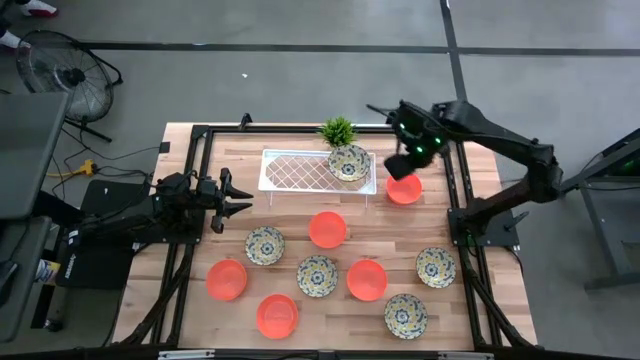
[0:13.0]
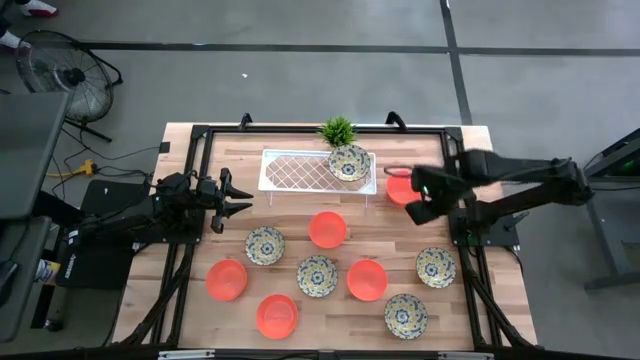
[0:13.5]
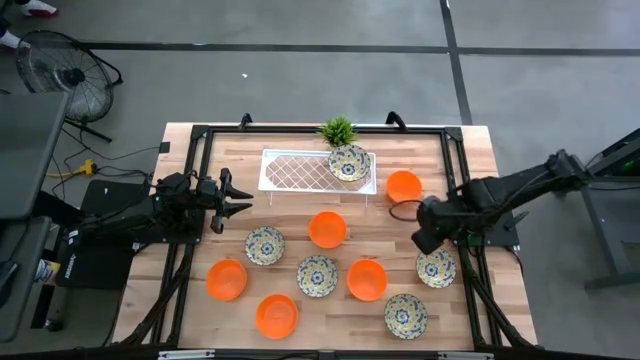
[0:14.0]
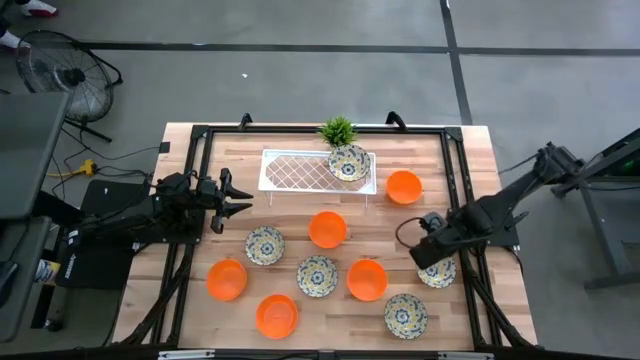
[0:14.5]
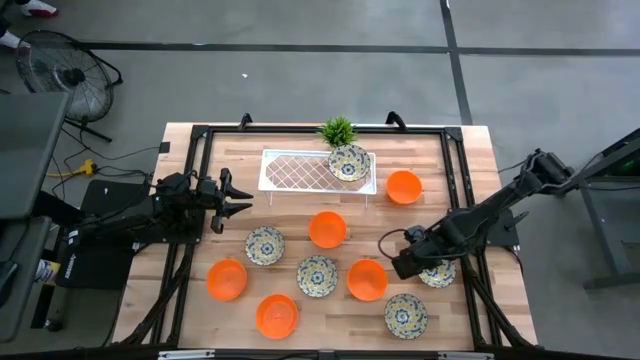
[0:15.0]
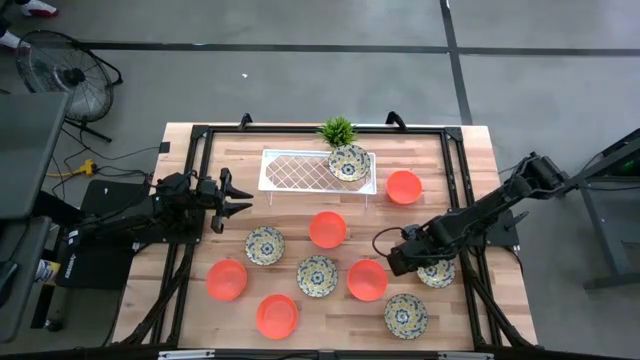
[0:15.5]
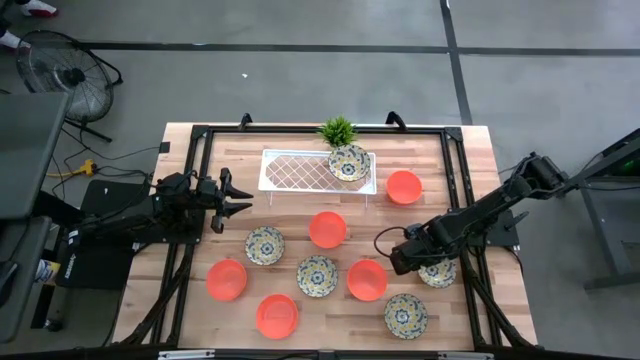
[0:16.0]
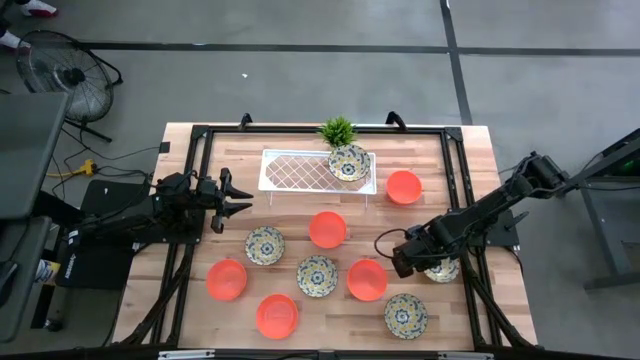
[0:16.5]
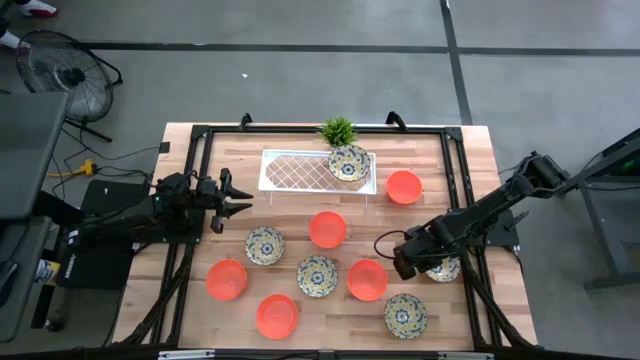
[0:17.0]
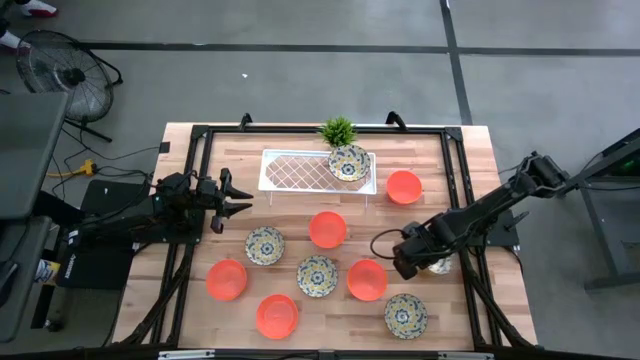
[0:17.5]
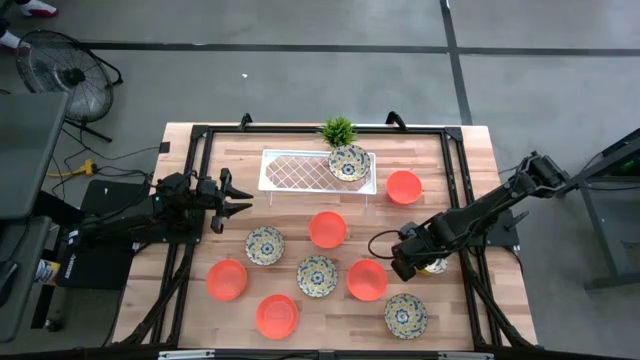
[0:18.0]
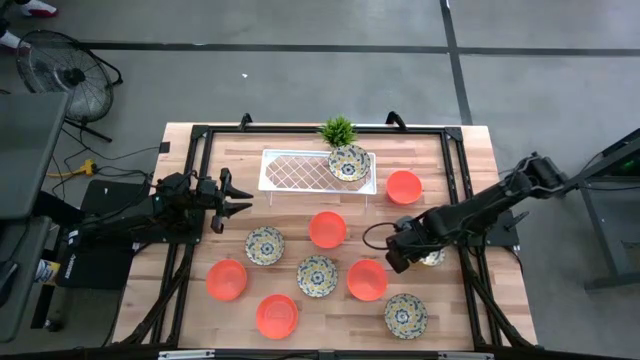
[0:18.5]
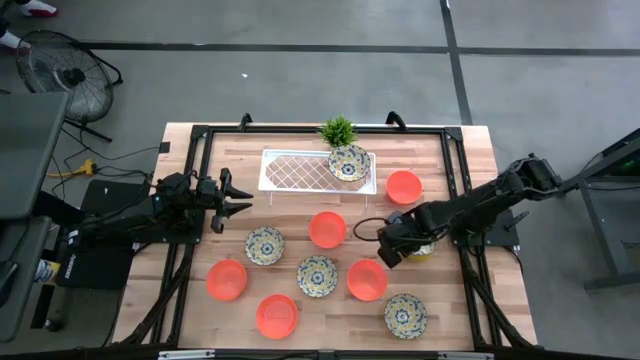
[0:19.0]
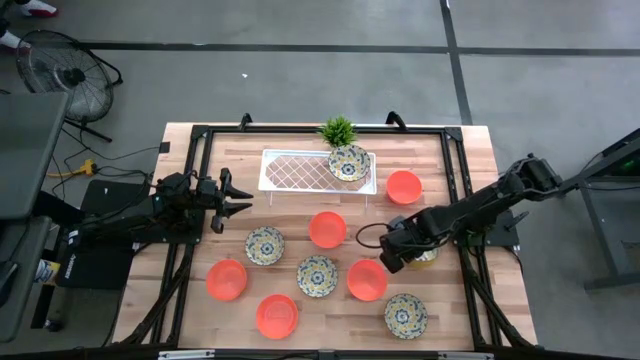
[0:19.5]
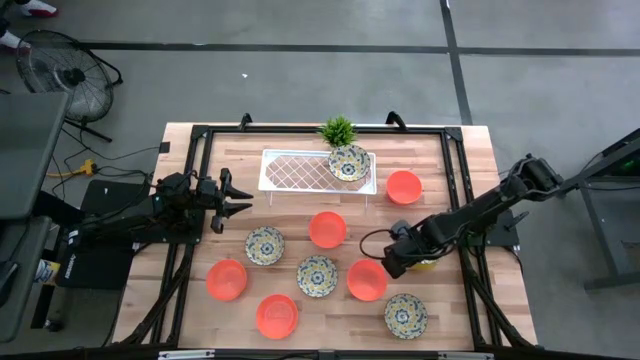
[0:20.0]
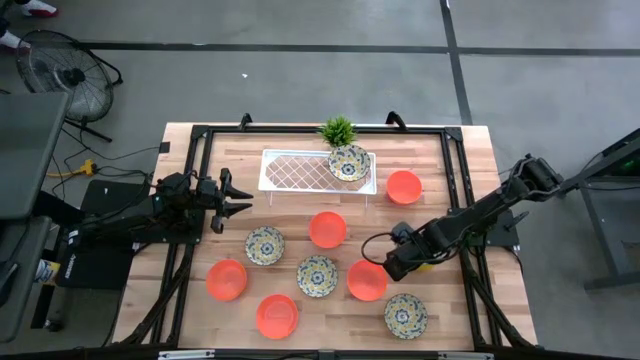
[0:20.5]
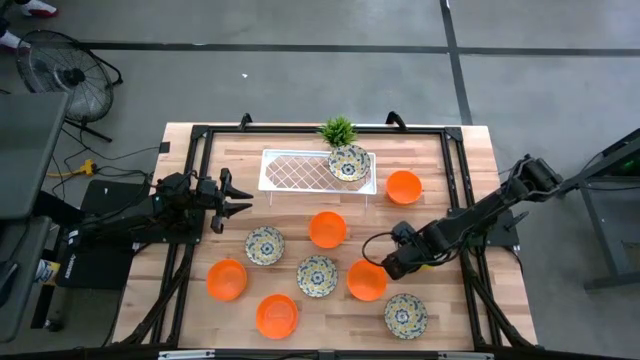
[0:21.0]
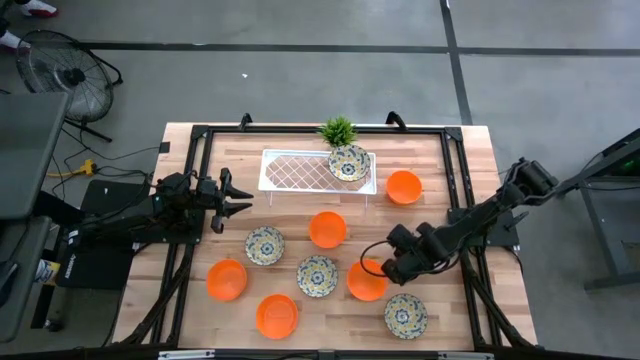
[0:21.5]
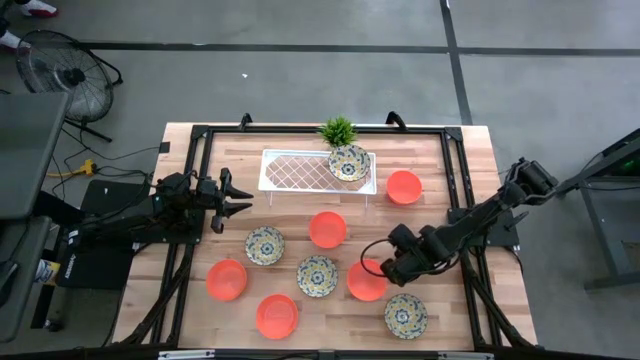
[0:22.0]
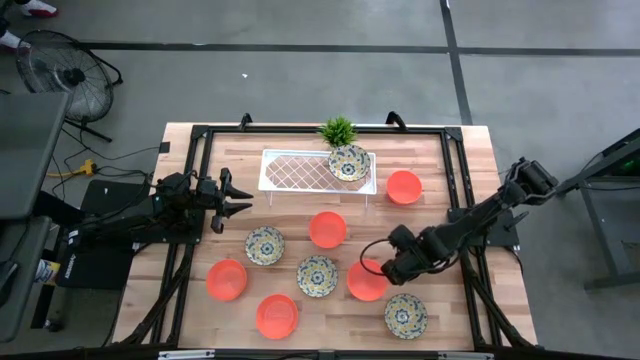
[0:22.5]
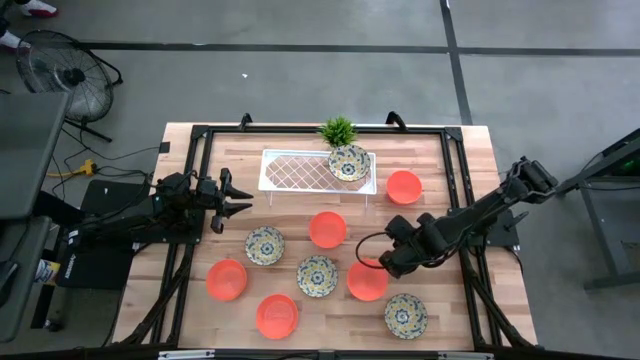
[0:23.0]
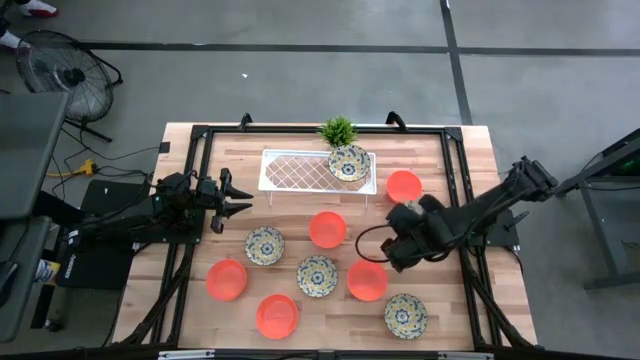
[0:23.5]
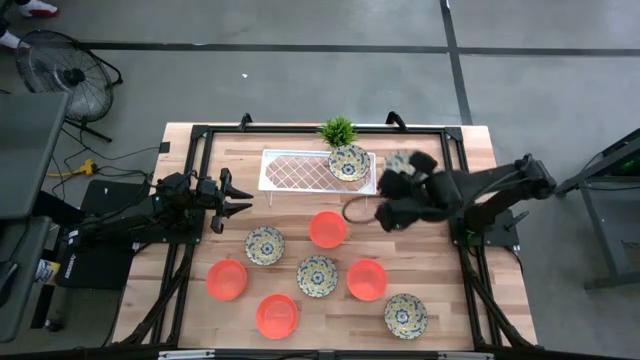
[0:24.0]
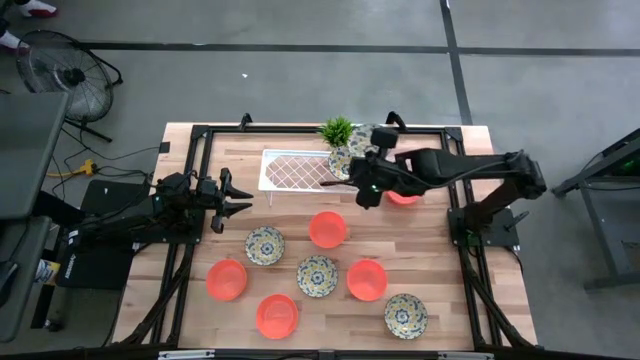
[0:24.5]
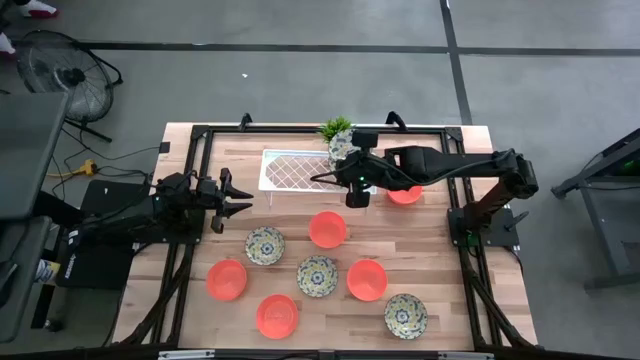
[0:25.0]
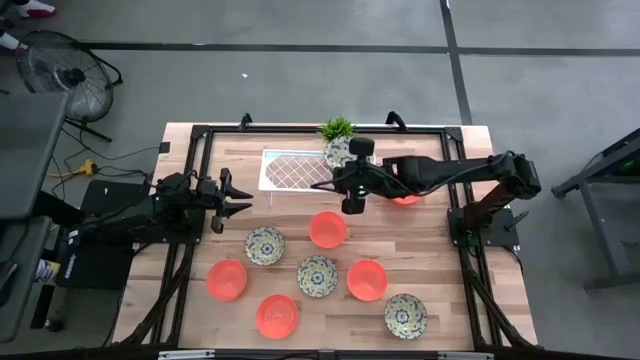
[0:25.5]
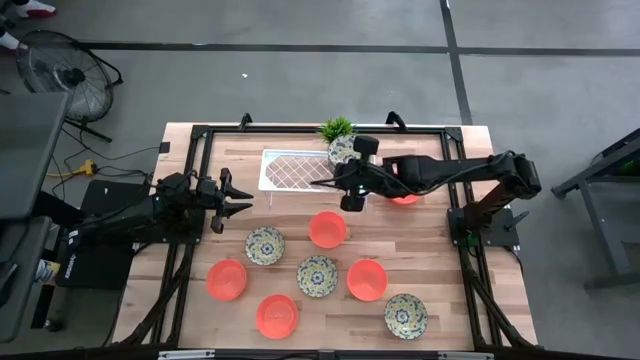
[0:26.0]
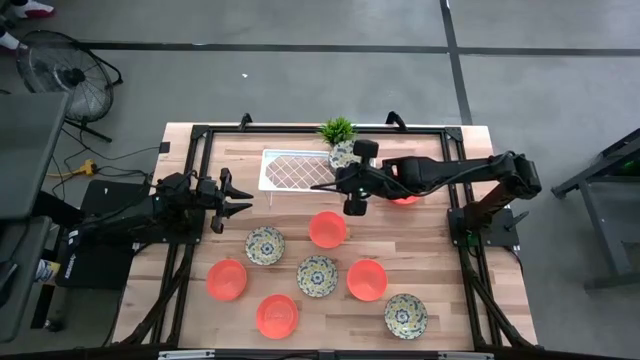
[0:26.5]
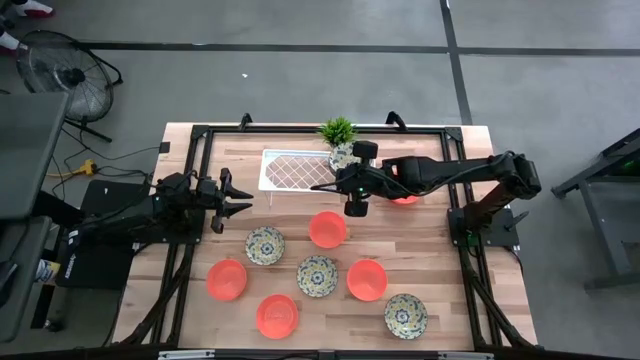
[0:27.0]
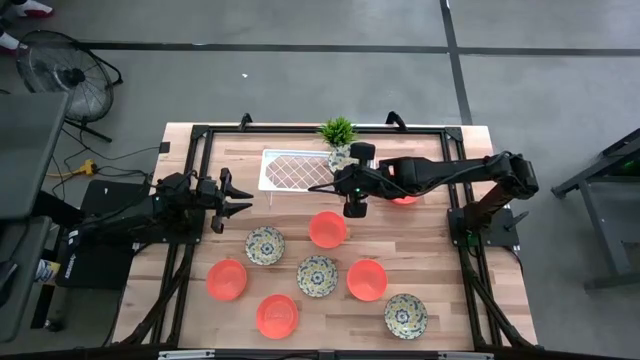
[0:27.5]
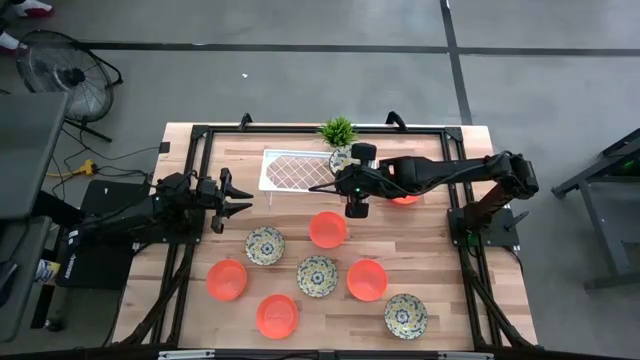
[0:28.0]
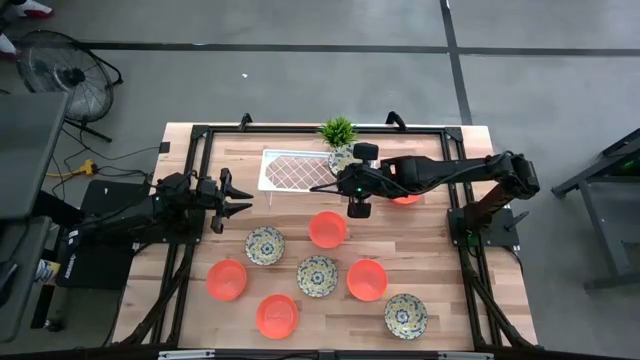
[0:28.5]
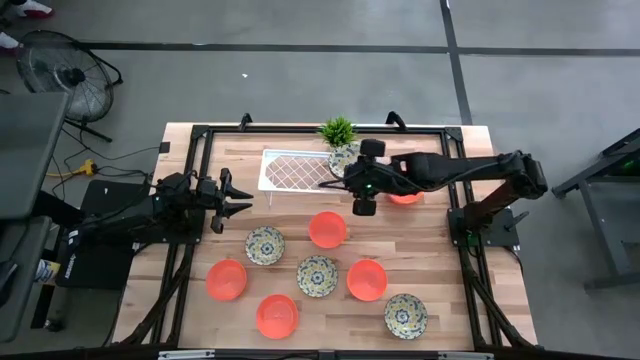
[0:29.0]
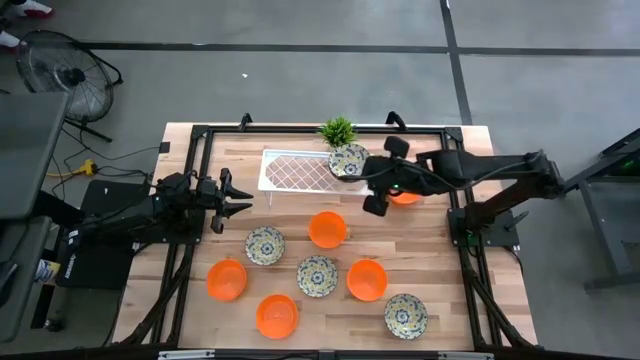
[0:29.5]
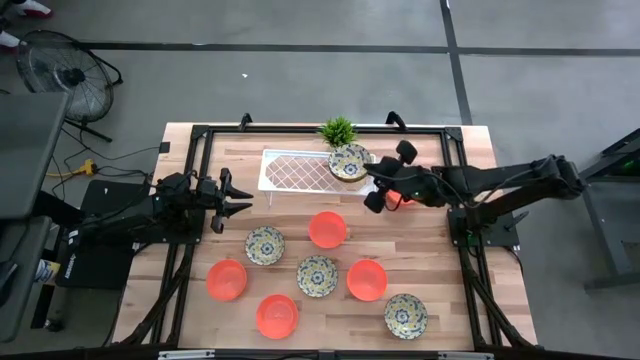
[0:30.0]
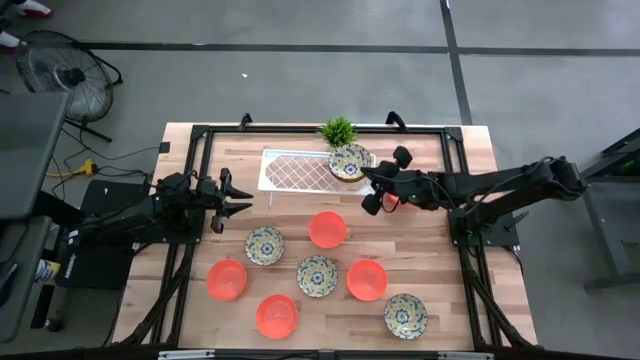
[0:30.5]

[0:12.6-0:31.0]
Task: Pick & Place Mini bowls
Stack the yellow bowl on the yellow bowl on the shelf

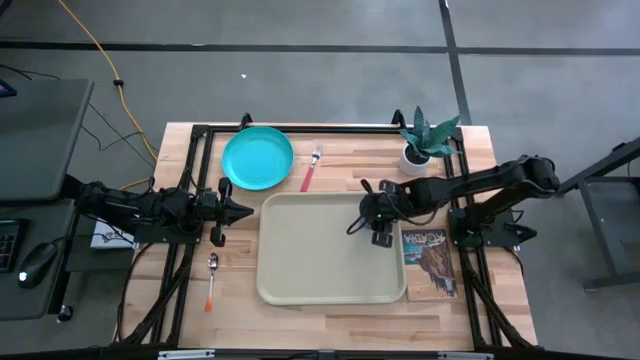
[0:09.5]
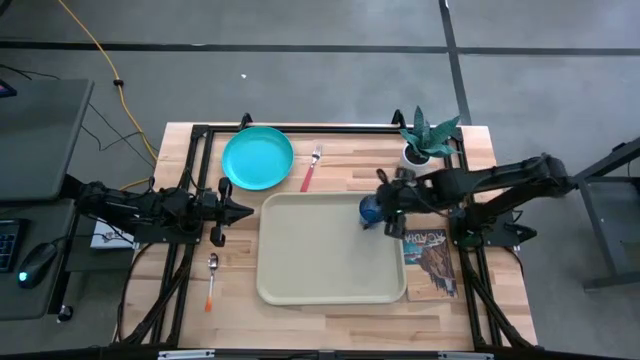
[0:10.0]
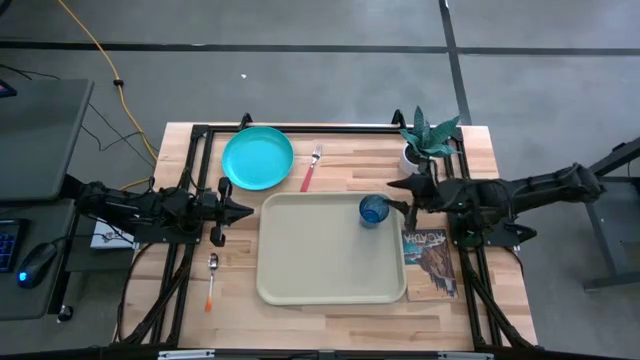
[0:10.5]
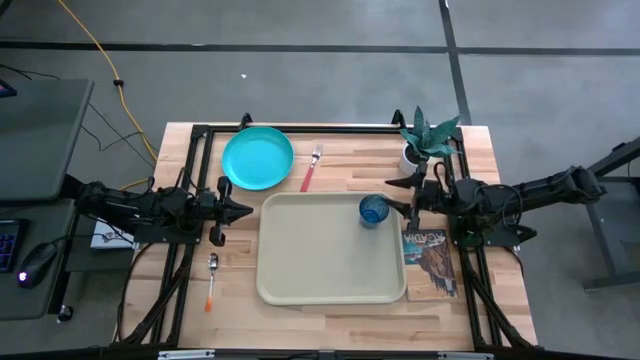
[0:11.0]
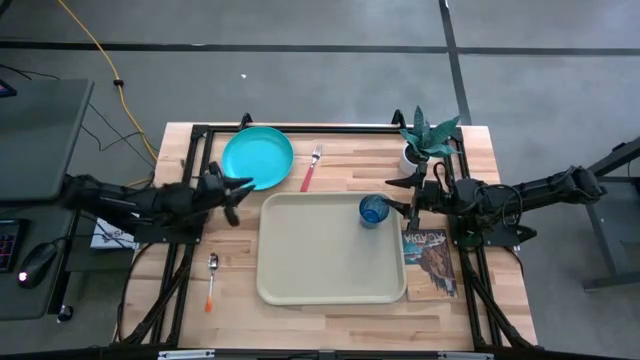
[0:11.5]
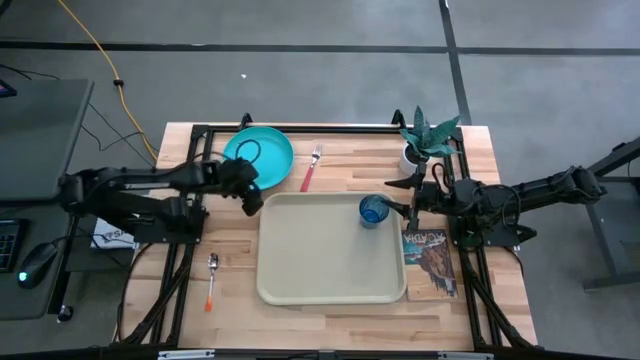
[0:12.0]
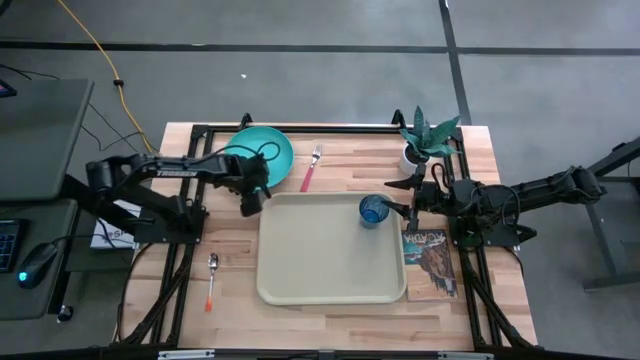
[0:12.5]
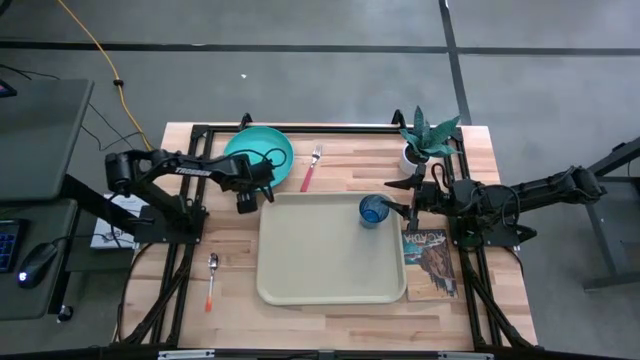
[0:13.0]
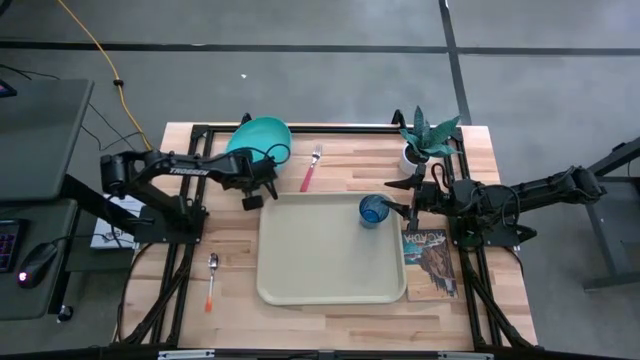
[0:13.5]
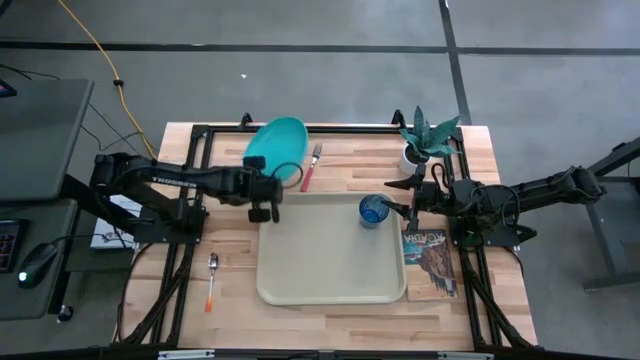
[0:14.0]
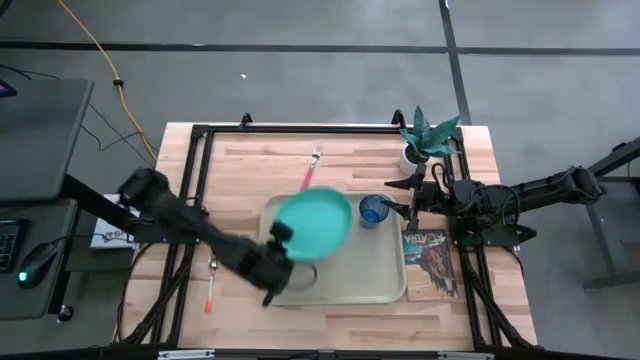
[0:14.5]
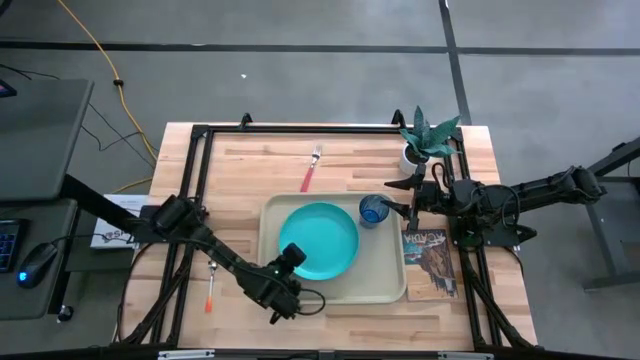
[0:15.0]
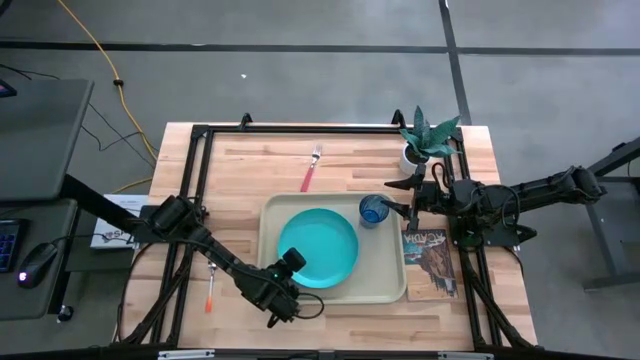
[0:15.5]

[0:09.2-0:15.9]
Task: Pick and place plate/cup/fork/spoon on tray
Put the blue plate to the bottom left of the blue cup on the gray serving tray
